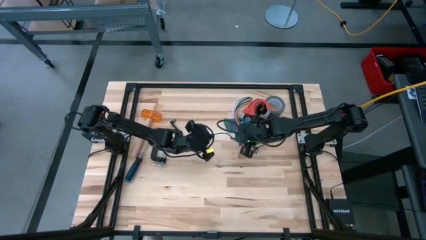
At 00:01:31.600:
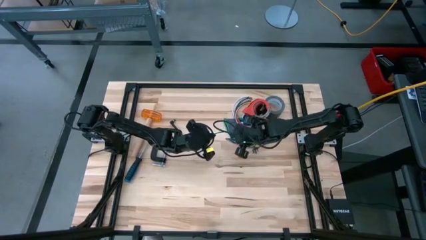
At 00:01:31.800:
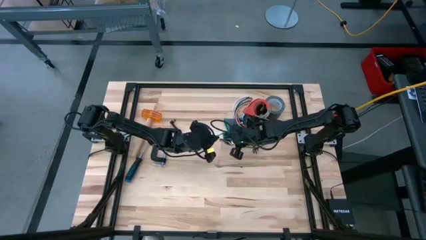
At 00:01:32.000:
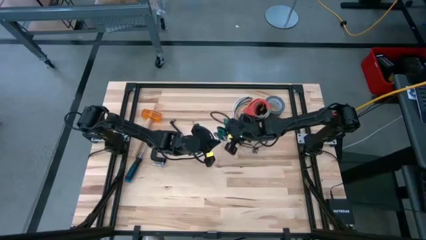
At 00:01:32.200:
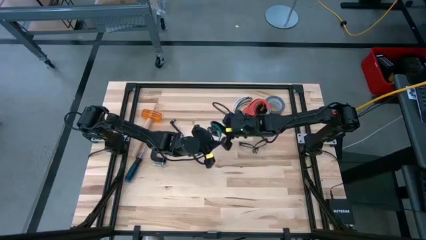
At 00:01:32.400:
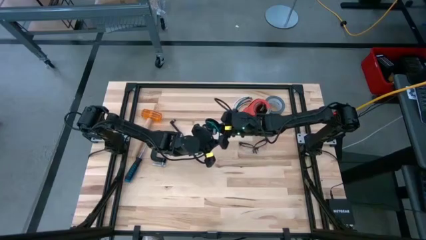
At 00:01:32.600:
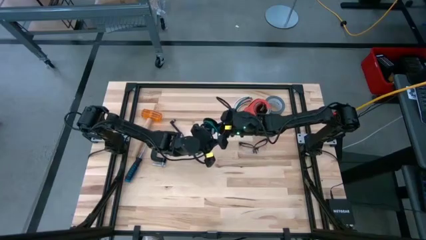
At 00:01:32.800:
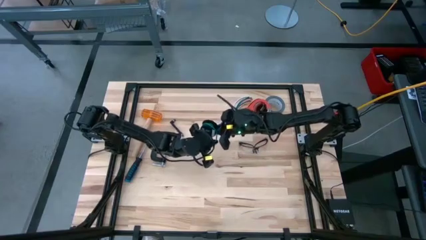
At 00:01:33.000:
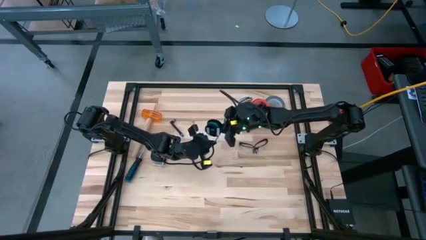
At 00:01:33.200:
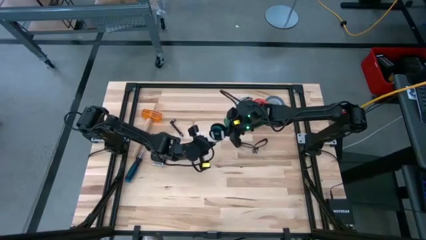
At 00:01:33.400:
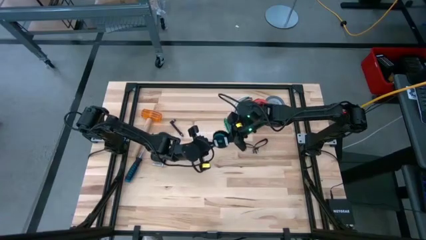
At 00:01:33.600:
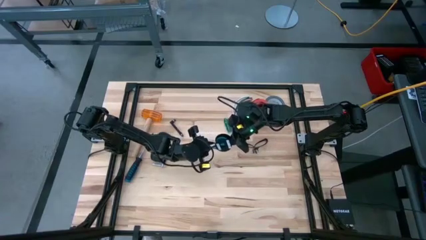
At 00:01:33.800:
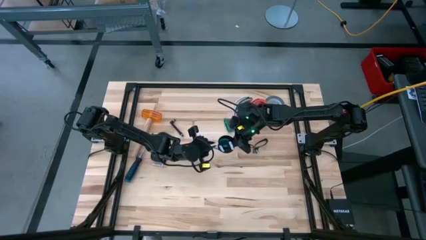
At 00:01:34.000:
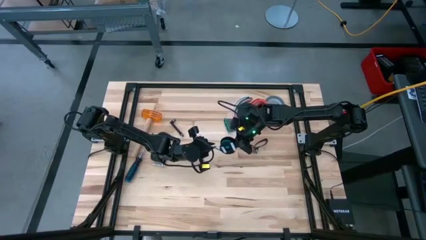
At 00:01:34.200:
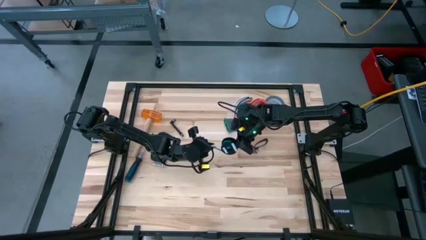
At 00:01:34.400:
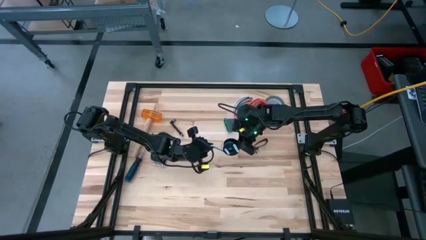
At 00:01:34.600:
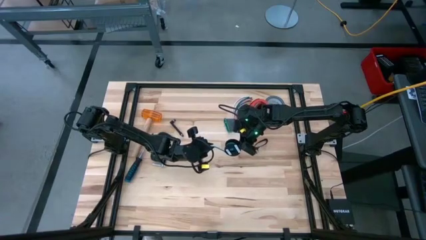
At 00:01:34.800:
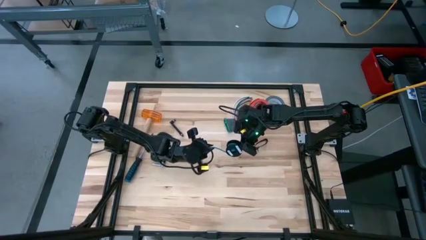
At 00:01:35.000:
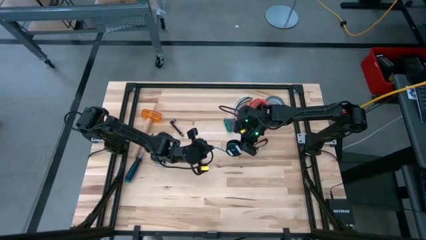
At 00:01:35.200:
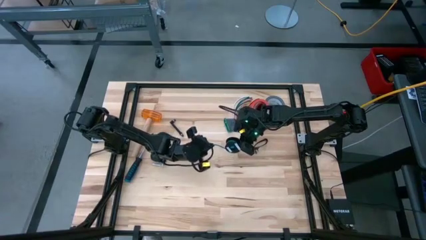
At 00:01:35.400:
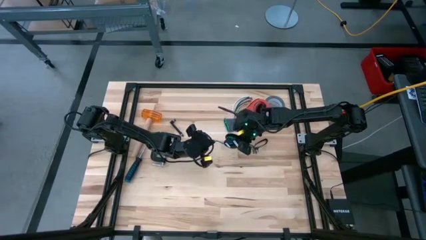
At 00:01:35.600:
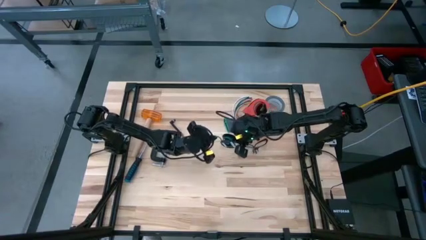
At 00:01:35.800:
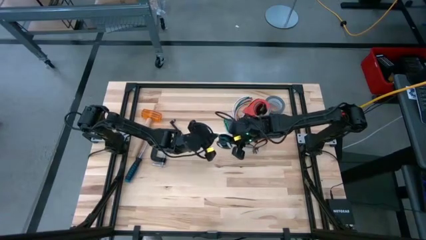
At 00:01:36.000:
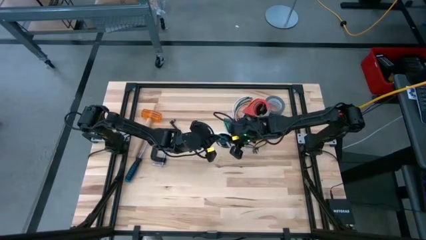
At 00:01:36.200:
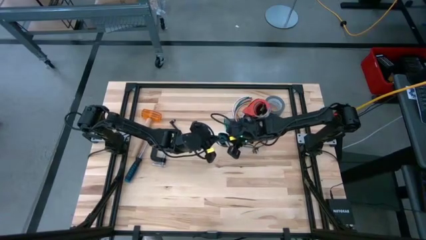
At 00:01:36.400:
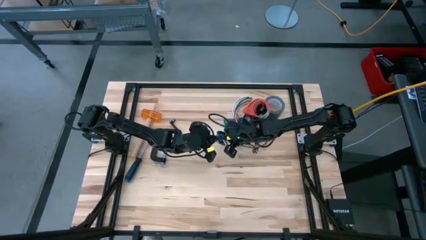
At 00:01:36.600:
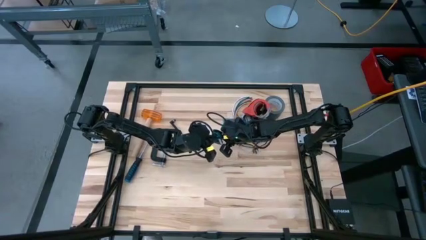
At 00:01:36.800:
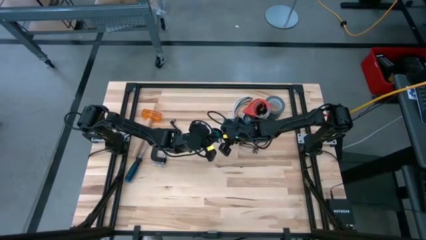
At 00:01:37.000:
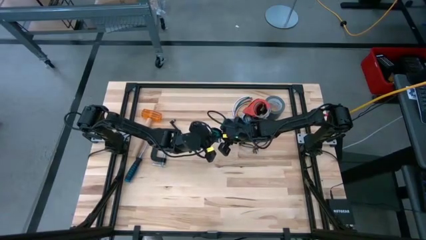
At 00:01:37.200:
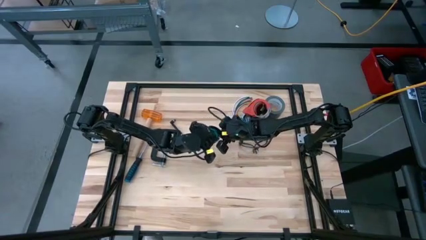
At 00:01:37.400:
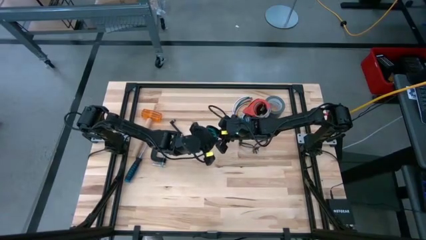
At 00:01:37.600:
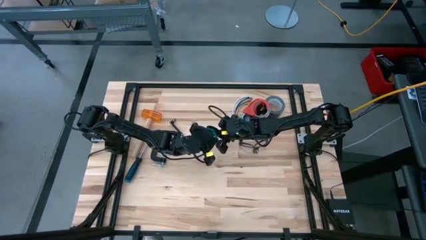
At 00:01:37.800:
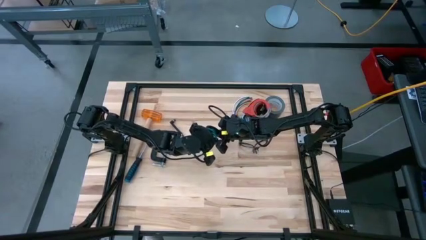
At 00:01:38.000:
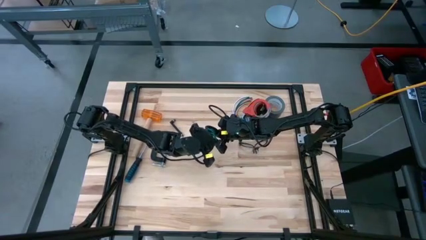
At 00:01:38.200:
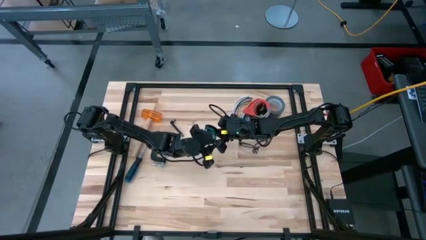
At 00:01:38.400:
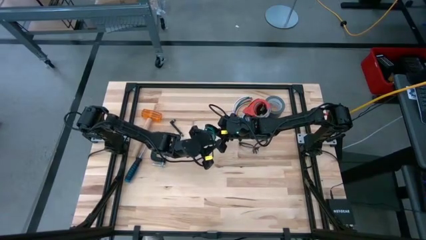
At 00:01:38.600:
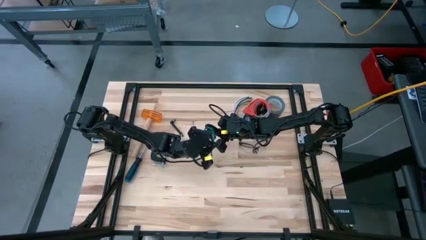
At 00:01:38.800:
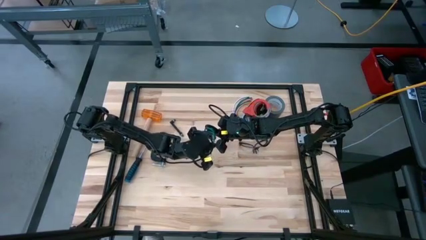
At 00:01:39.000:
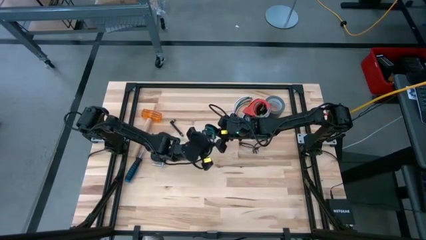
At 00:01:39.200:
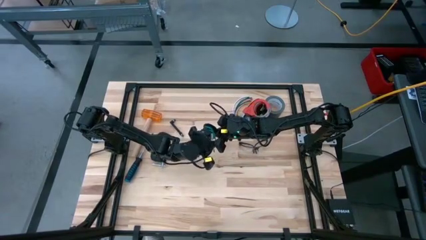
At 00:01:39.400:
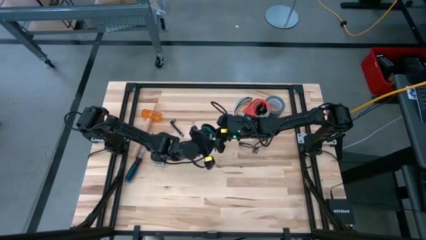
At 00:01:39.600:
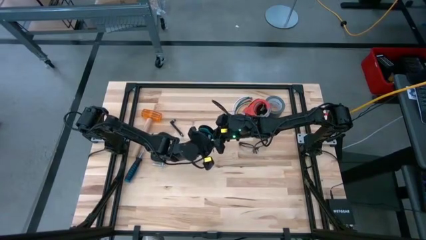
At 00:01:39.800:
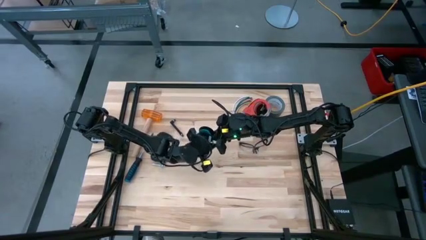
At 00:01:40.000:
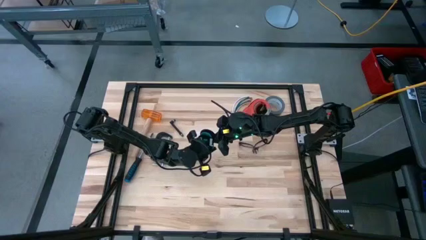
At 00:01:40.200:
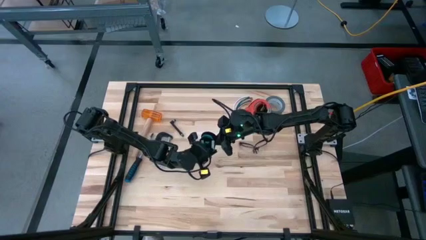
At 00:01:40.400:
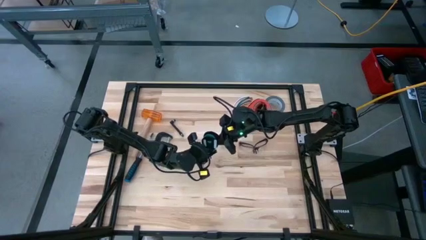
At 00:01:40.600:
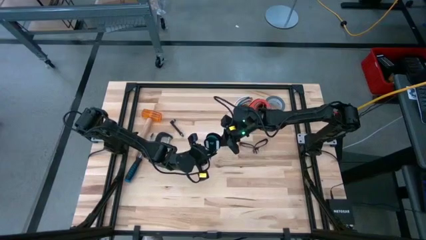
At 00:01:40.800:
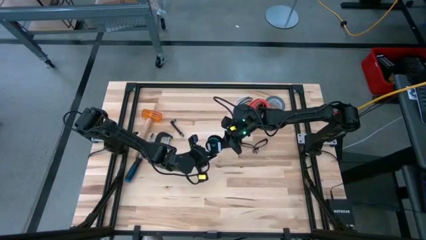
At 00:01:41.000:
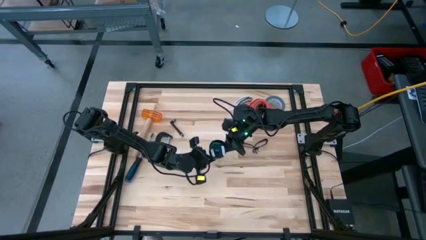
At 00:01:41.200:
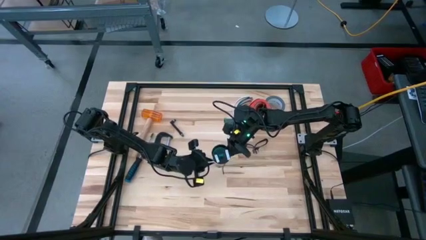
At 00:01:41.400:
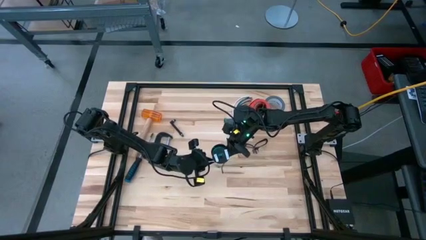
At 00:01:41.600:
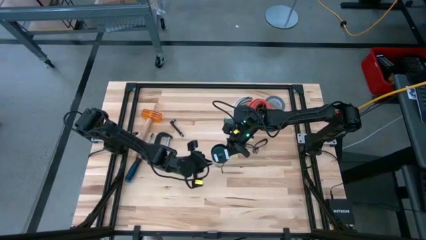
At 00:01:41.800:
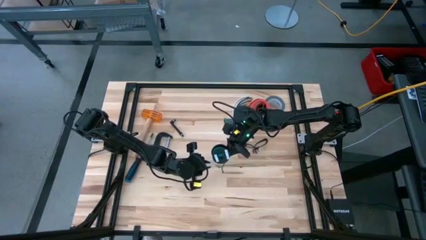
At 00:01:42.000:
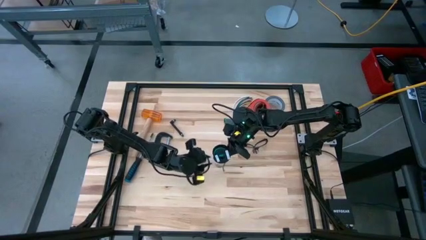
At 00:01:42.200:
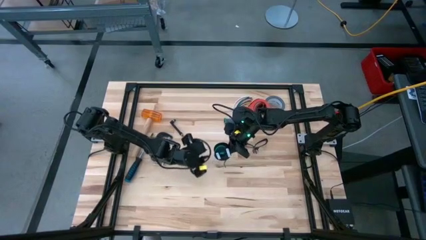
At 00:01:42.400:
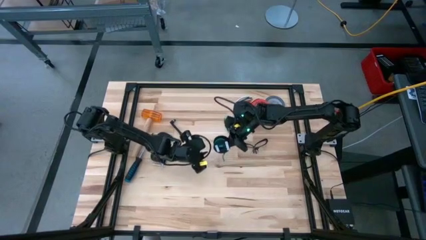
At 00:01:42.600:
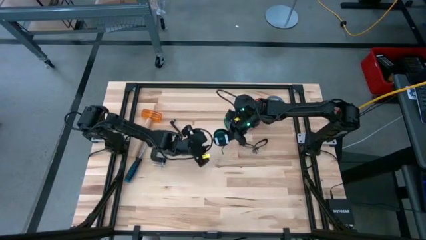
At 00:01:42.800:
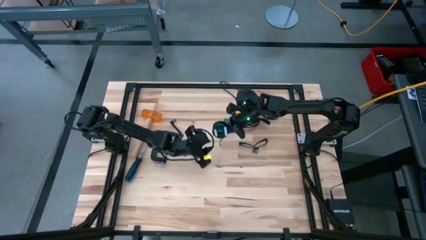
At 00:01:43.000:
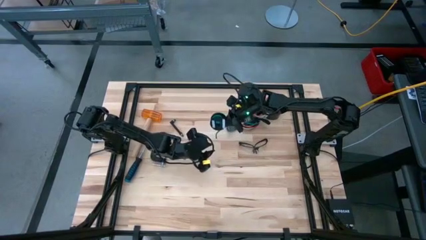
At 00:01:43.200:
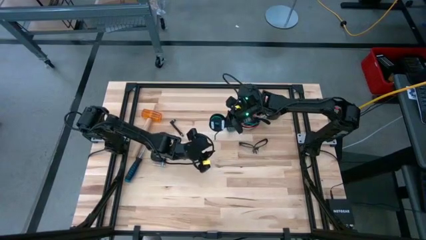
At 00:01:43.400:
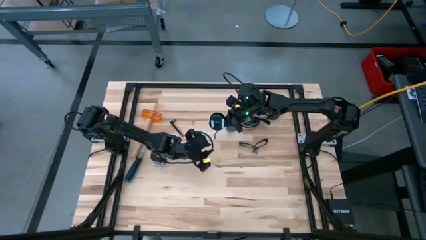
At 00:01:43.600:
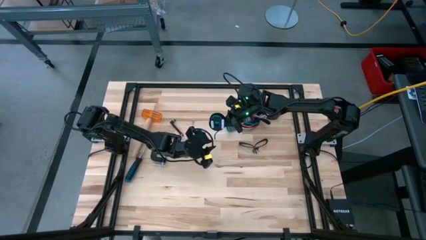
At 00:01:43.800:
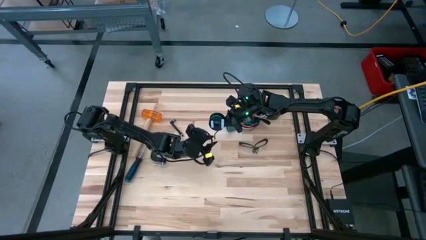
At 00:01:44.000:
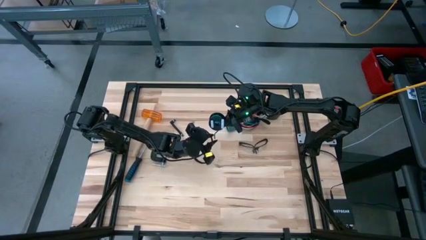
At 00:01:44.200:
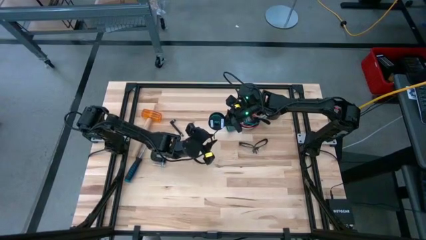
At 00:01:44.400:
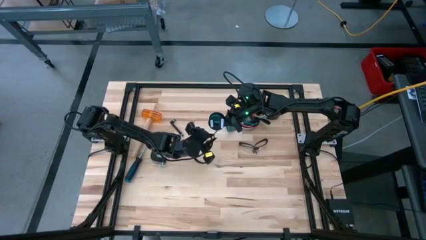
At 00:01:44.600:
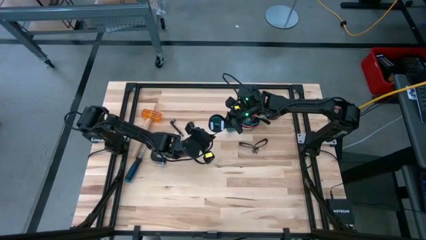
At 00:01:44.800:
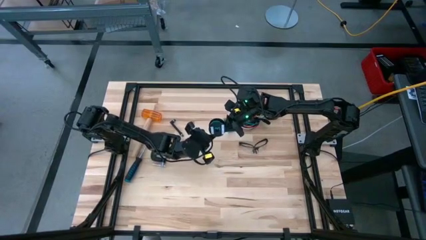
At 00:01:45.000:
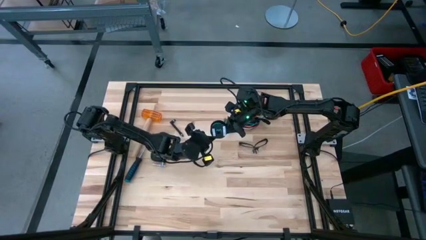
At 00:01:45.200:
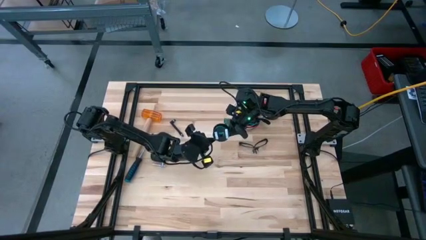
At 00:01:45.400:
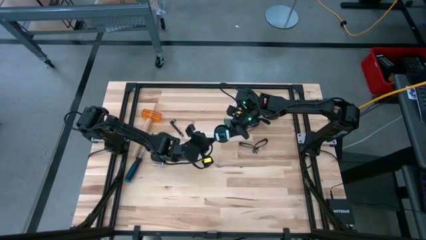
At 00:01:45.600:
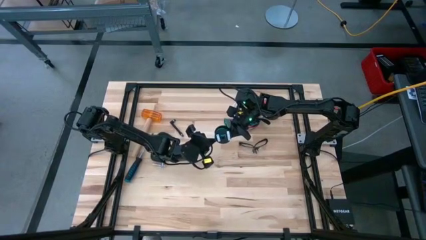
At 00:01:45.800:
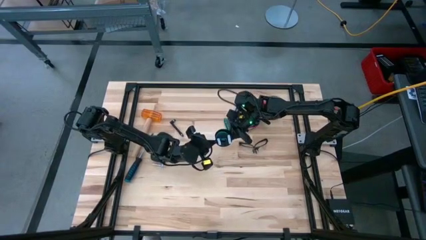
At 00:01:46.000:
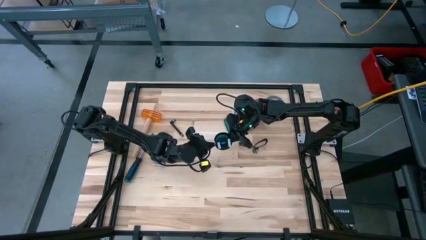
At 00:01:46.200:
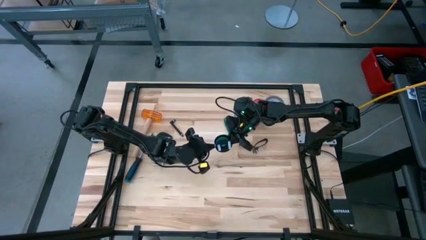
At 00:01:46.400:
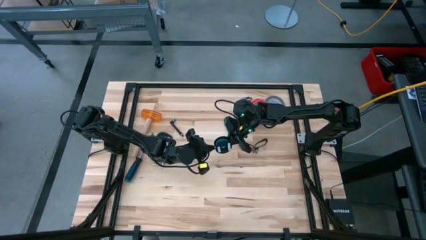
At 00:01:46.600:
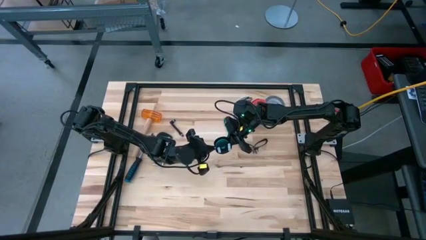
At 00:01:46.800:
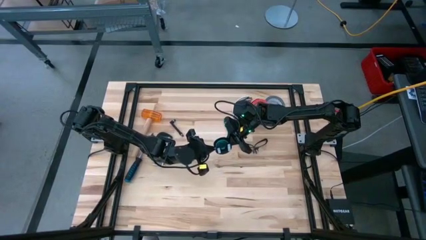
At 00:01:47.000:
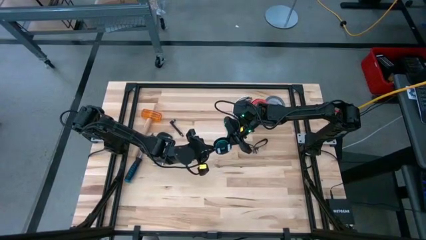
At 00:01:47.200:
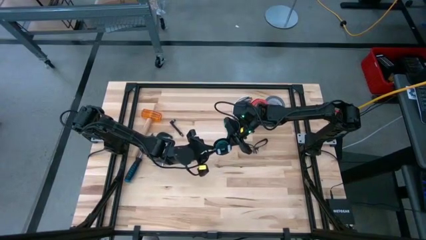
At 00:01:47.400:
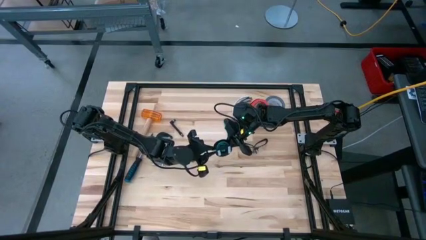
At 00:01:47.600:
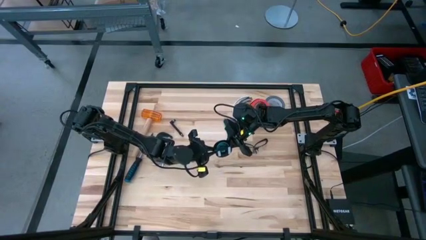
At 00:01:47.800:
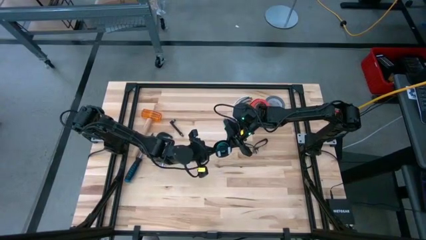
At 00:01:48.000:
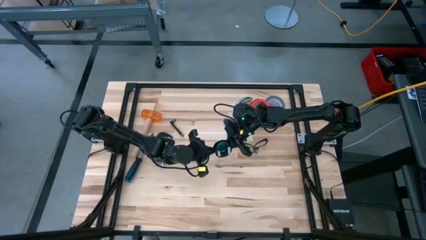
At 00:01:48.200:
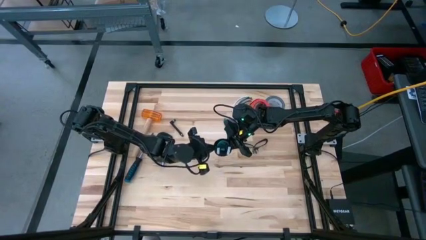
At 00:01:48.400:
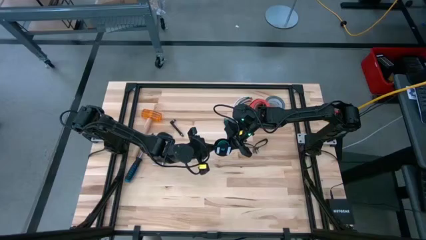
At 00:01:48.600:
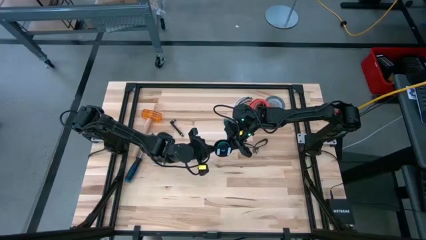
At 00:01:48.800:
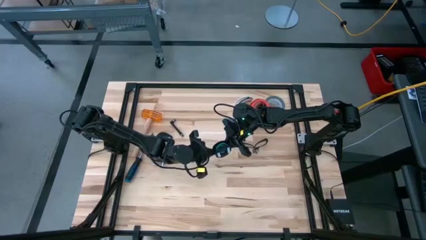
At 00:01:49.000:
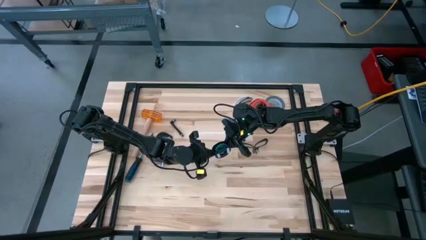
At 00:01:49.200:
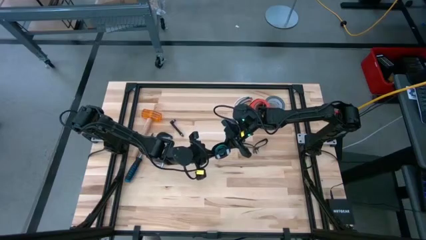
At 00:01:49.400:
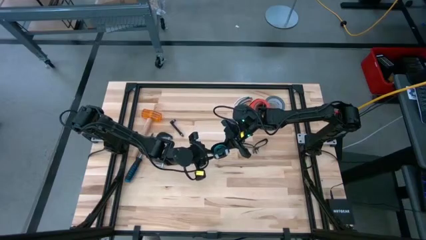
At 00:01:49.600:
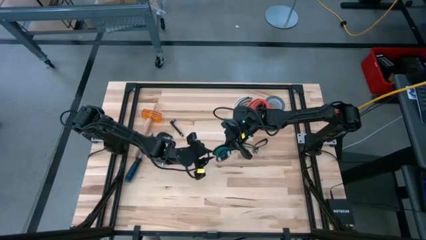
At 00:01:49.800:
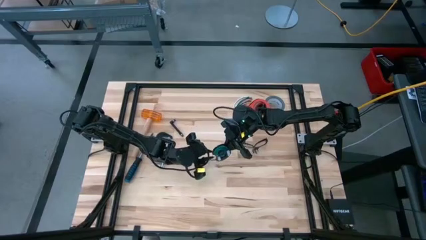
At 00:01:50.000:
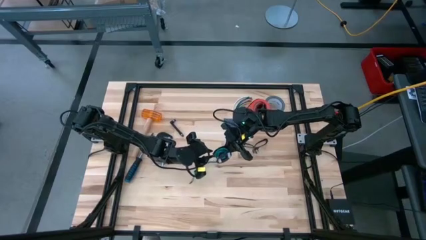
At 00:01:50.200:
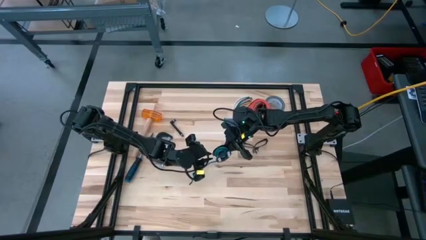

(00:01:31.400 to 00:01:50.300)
Task: Coil cords
Coil the green wire to the spool
